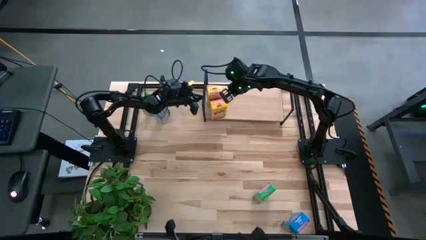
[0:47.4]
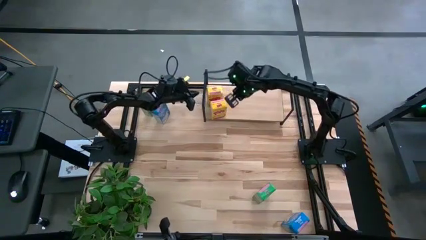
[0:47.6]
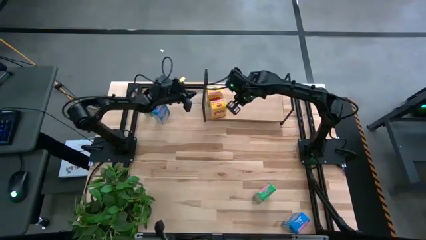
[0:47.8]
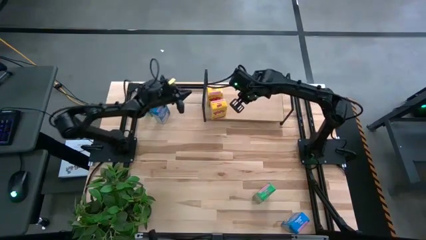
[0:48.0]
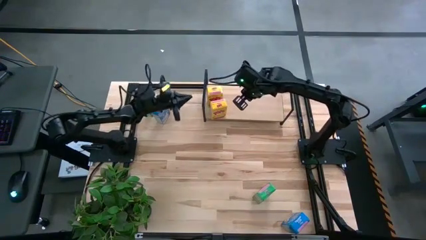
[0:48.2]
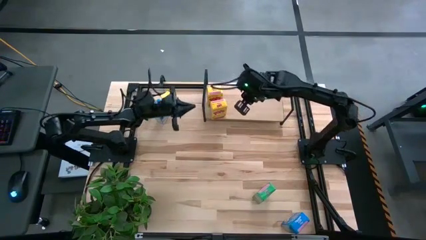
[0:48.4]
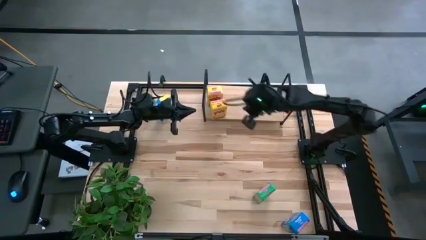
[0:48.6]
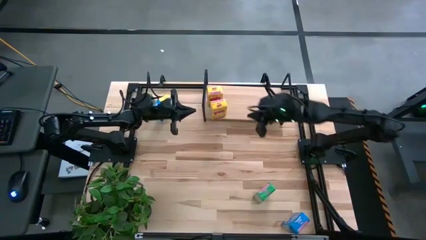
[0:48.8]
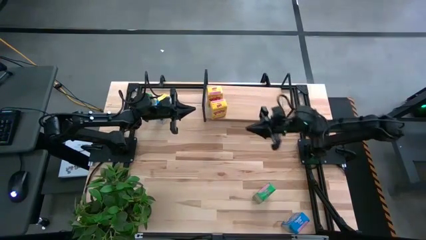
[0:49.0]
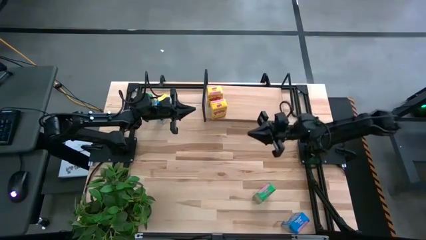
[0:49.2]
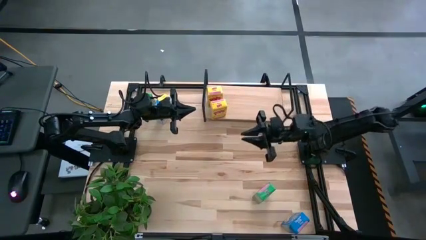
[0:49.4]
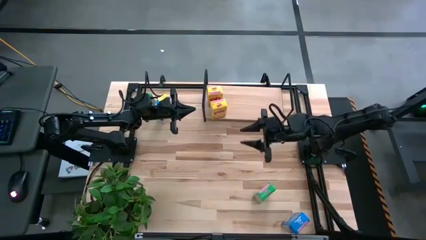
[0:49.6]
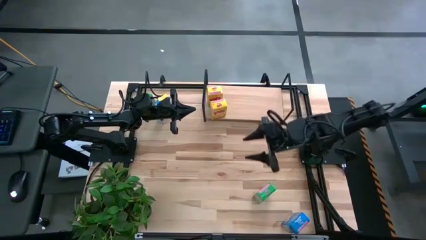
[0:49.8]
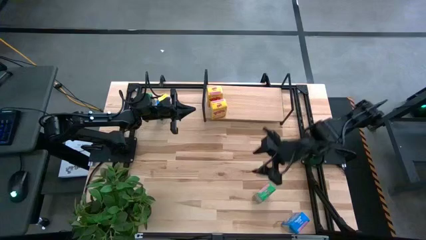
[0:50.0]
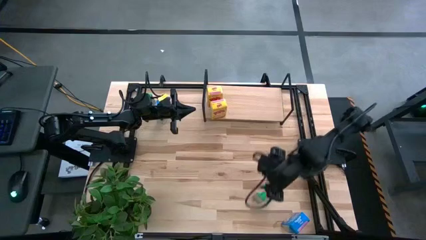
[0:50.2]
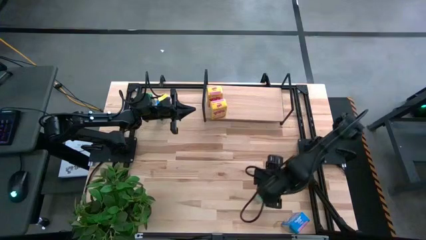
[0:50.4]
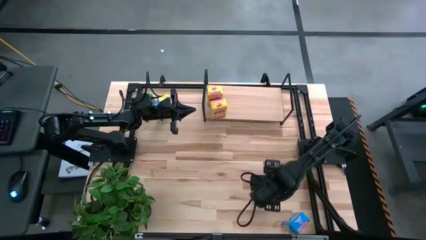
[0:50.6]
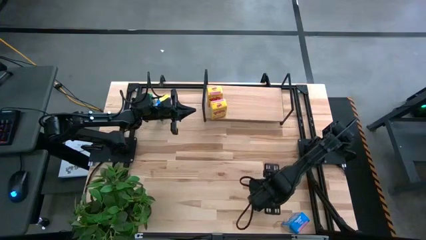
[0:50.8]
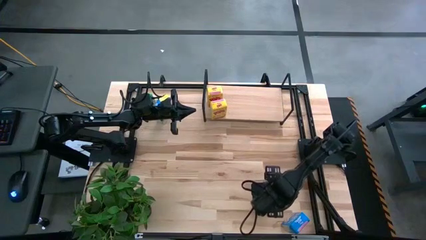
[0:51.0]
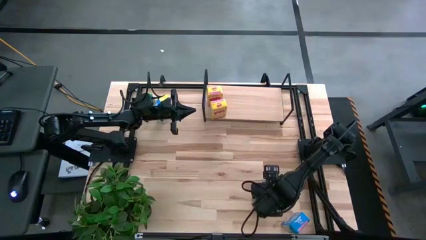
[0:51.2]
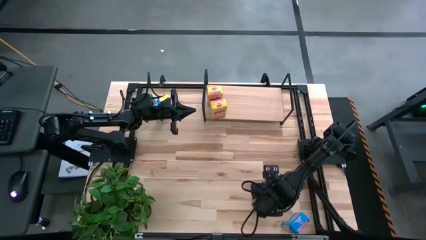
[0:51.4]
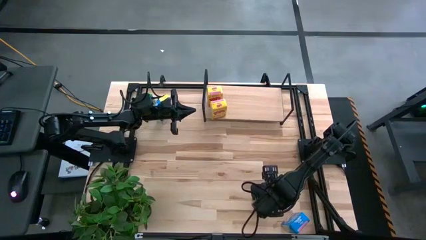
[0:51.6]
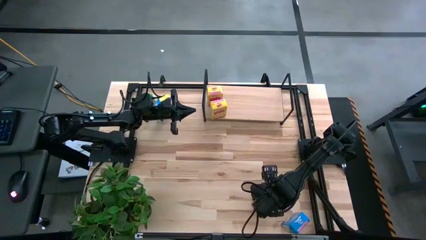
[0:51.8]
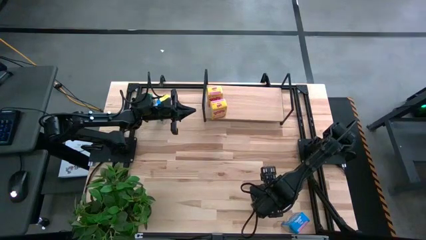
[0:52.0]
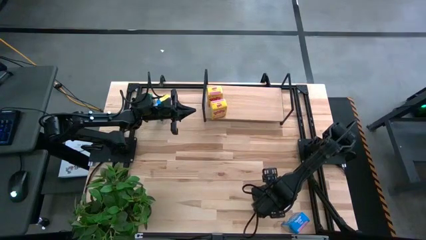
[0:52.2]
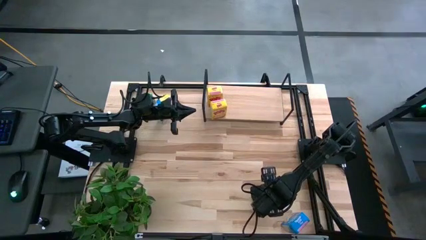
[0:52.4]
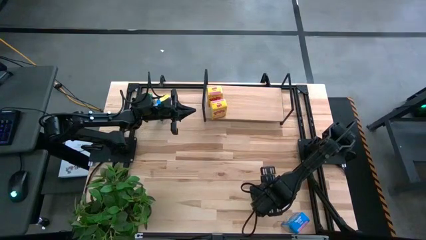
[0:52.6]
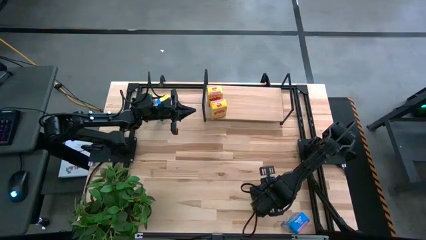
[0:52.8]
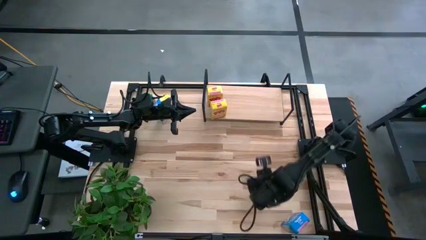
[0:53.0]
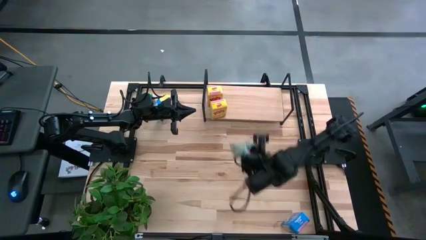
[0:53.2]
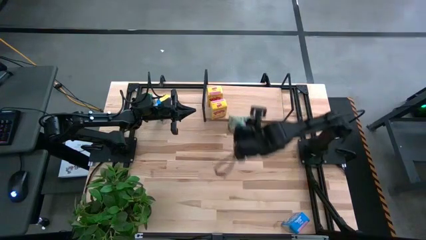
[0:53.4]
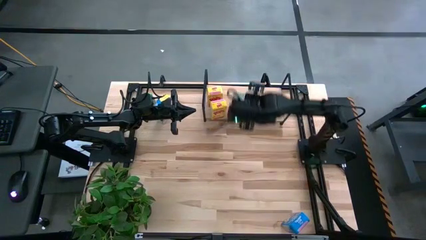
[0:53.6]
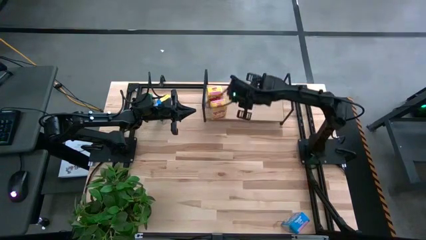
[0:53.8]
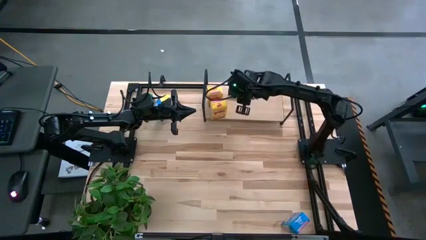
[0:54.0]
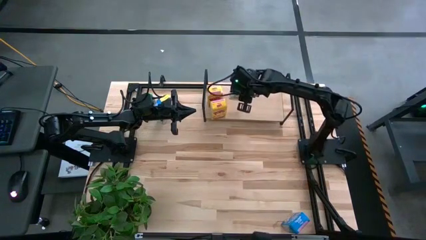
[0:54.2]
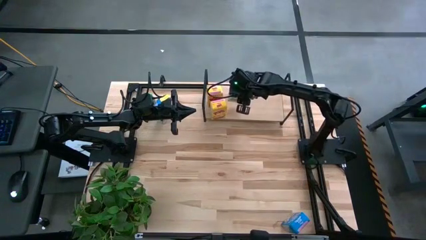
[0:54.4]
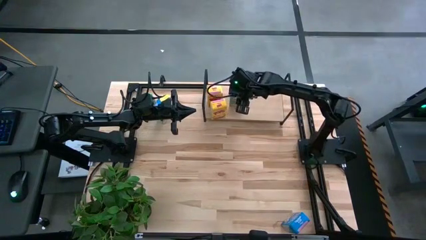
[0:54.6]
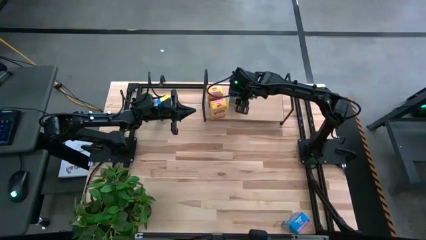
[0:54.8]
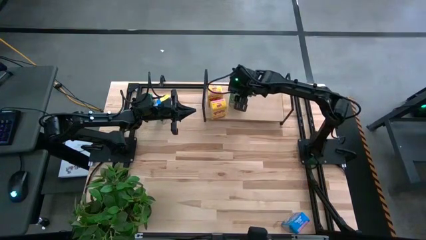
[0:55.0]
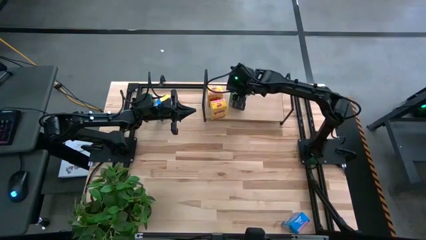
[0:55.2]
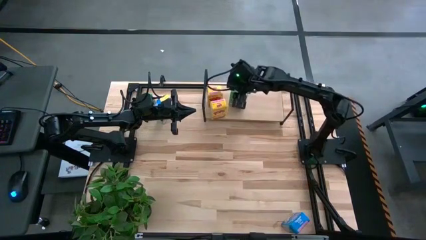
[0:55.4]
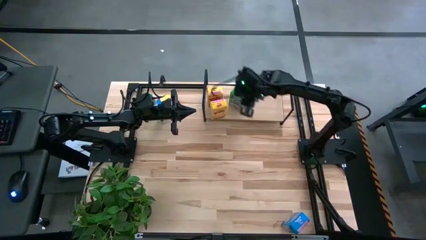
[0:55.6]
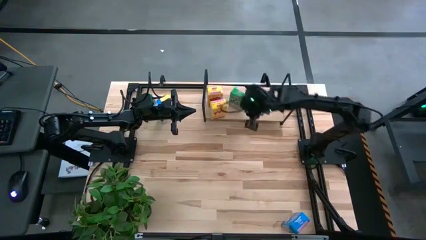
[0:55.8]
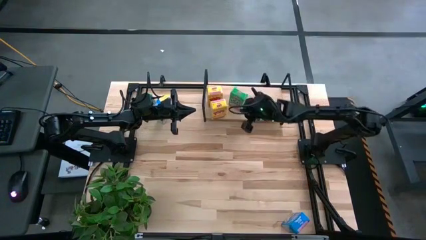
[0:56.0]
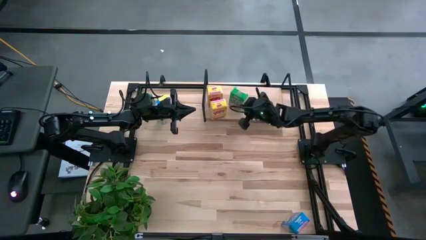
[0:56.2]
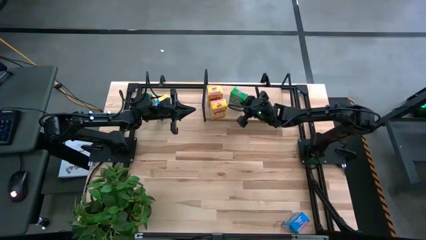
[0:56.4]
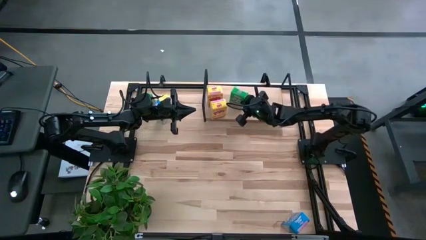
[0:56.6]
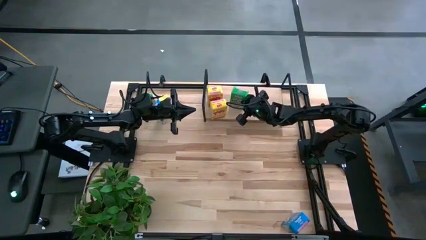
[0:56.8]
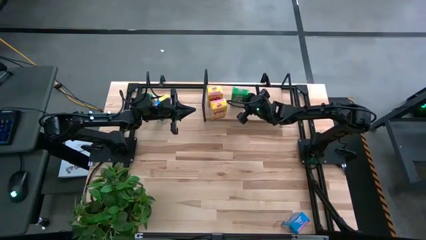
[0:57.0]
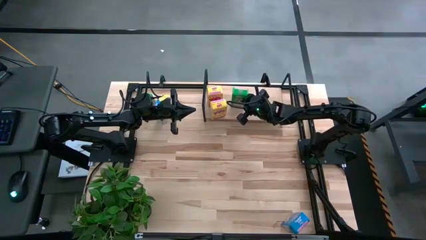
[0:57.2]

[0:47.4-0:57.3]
Task: Stack cereal on shelf
Put the bottom green cereal box on the shelf

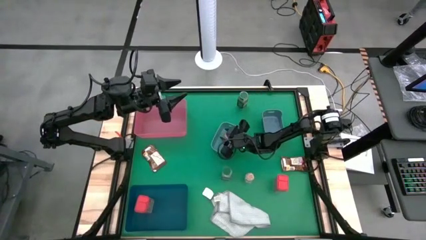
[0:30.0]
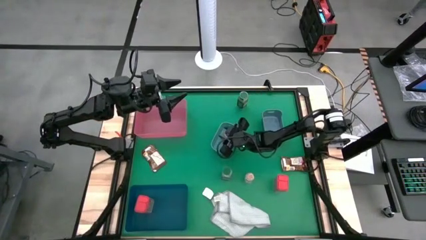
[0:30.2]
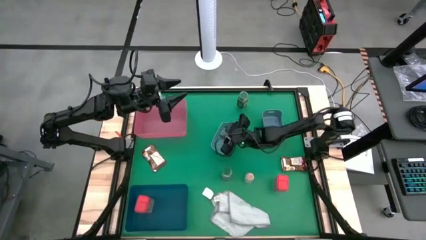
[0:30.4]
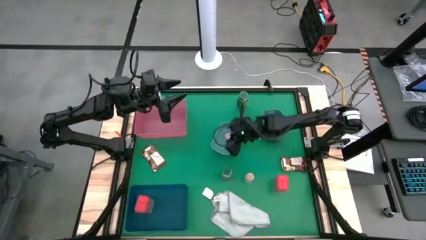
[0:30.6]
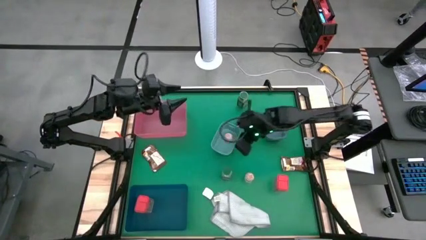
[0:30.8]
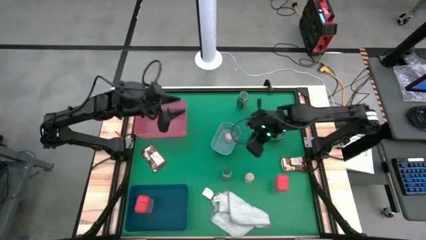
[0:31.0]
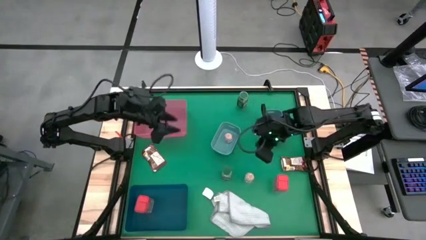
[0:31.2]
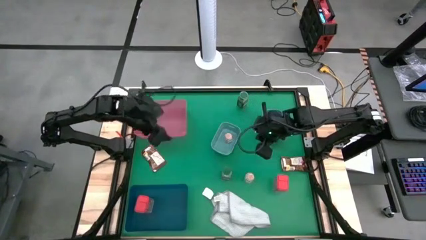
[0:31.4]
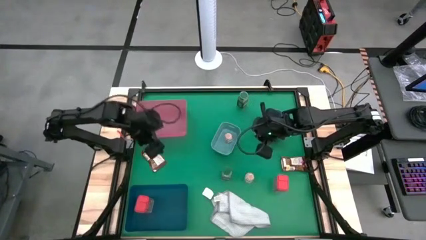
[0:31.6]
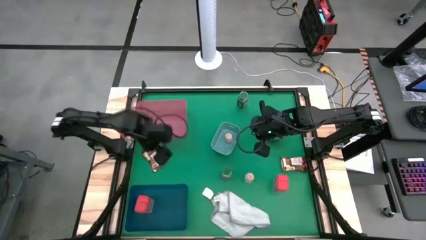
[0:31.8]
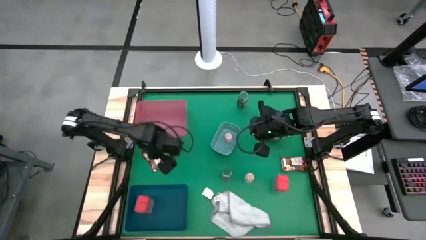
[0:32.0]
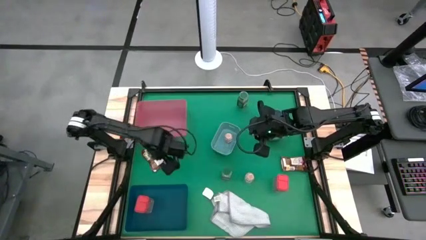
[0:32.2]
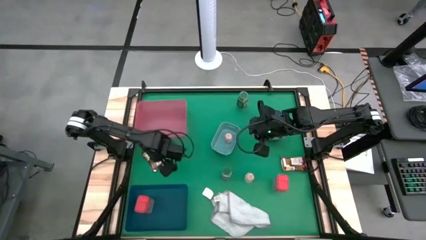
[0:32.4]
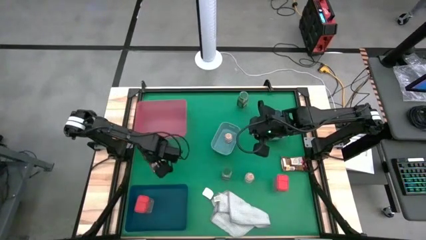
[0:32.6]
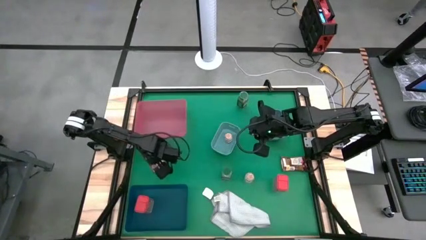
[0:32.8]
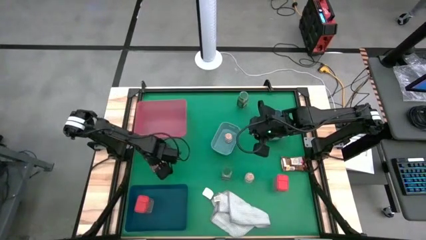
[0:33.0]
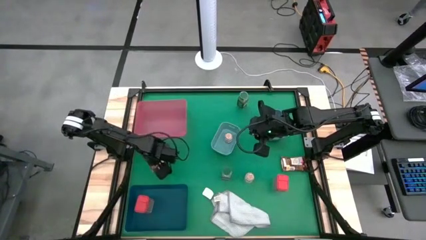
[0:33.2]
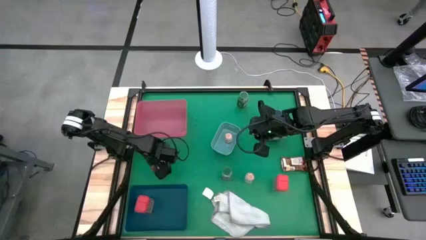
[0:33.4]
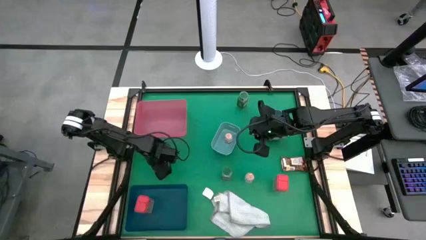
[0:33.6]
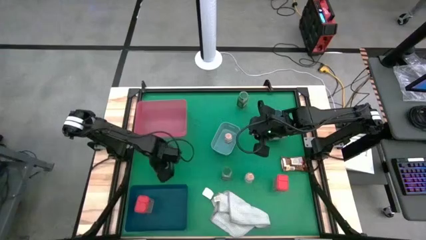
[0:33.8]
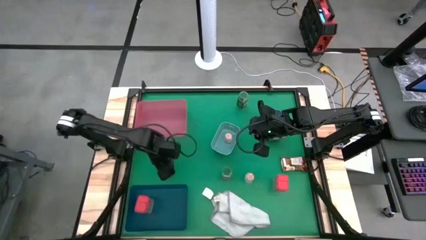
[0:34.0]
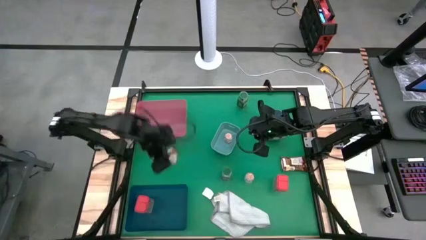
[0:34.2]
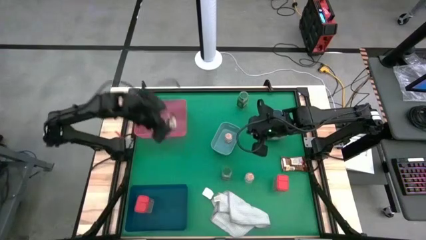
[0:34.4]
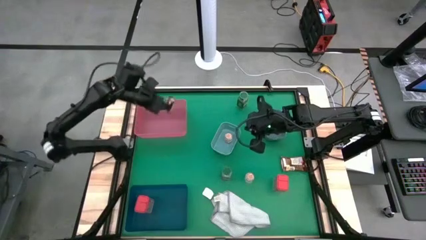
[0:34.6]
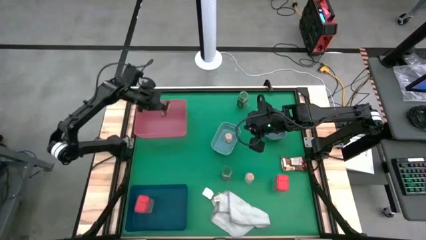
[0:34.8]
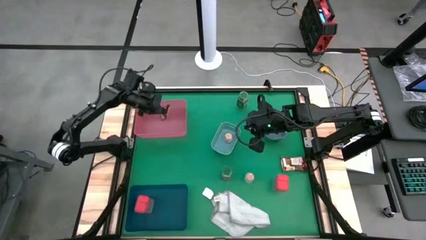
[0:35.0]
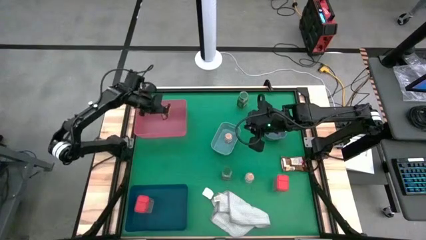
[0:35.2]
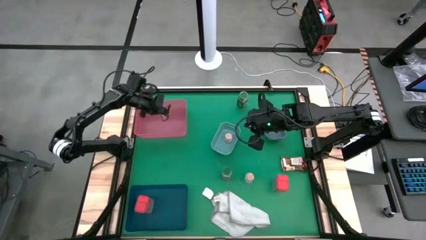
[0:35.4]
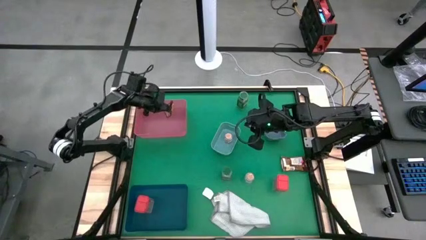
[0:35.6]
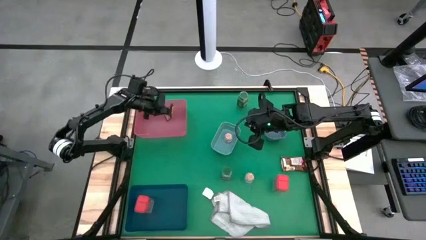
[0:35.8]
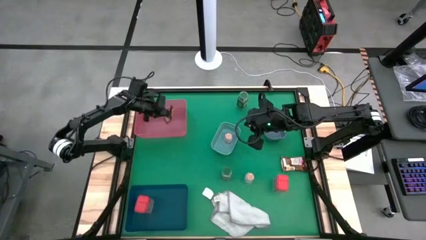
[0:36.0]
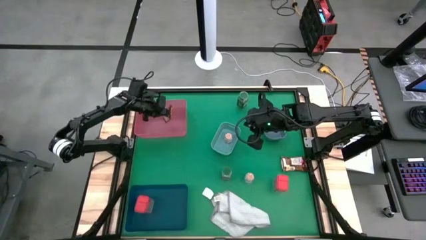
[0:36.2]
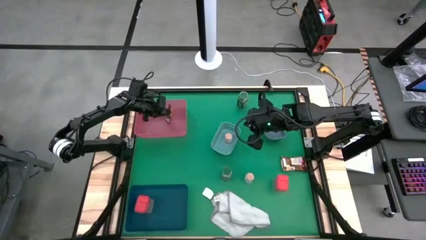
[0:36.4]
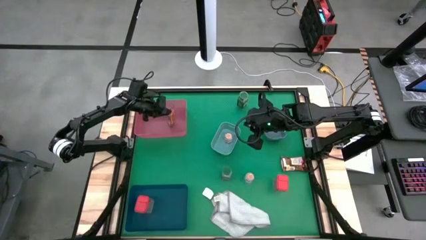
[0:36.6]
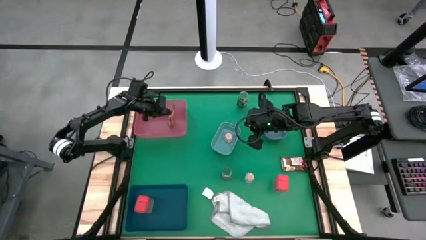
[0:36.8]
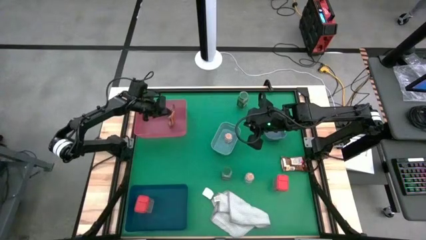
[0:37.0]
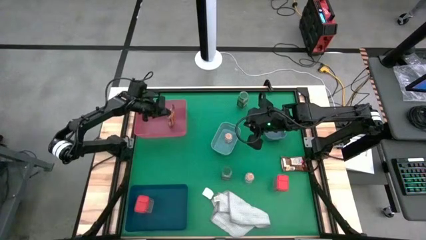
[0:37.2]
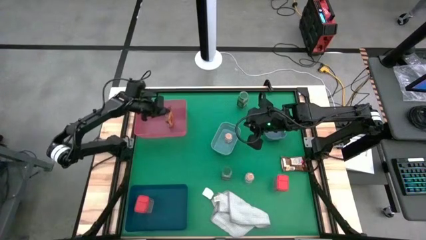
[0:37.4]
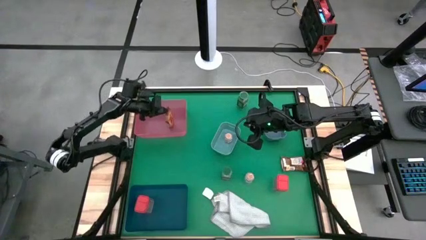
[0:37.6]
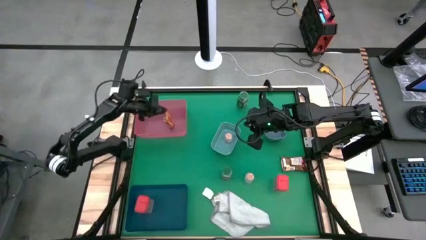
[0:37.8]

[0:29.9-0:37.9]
Task: Sort spices by type
Put the left orange seasoning pack into the red bin
